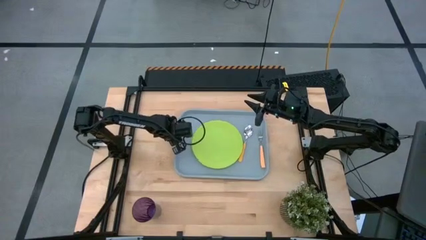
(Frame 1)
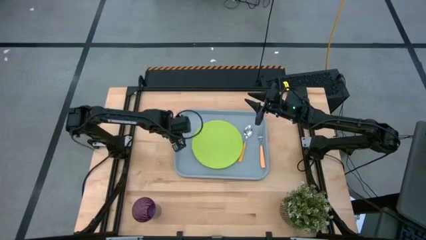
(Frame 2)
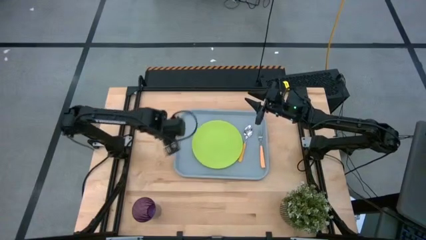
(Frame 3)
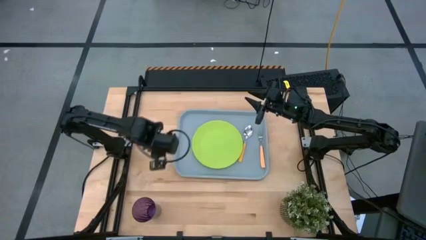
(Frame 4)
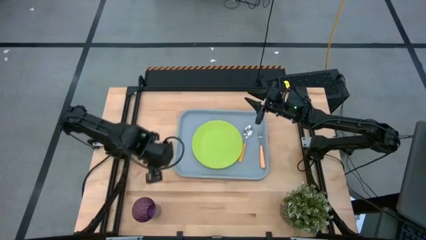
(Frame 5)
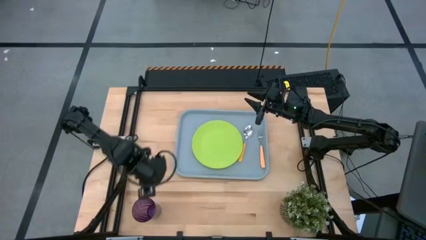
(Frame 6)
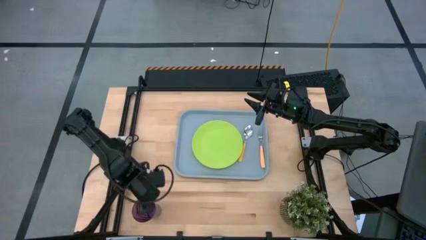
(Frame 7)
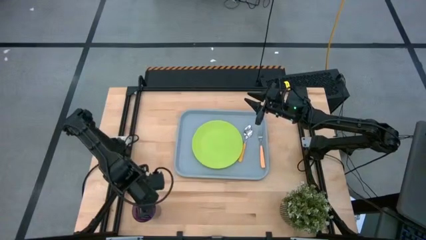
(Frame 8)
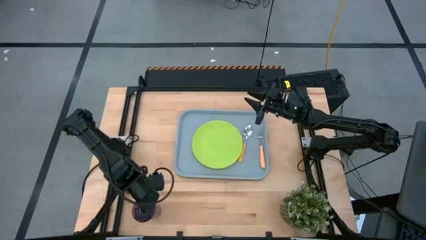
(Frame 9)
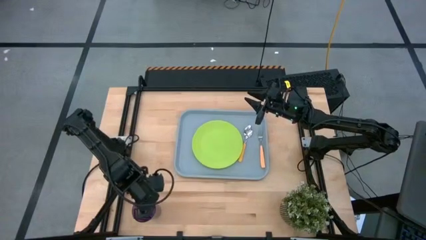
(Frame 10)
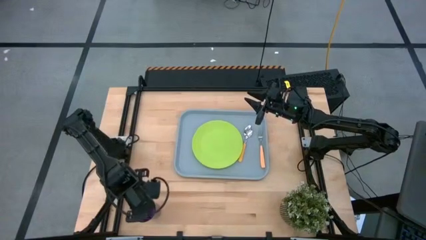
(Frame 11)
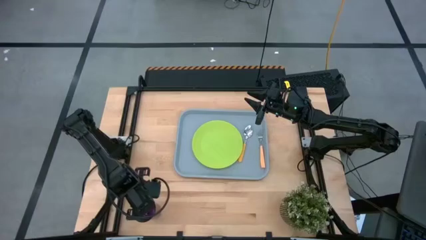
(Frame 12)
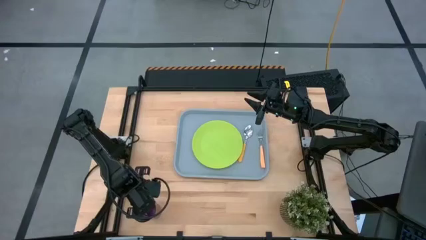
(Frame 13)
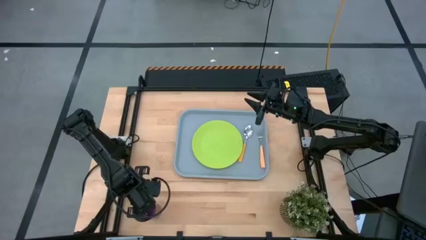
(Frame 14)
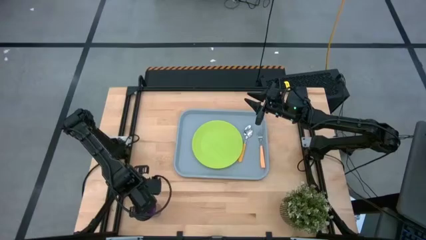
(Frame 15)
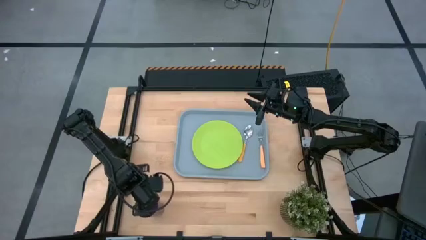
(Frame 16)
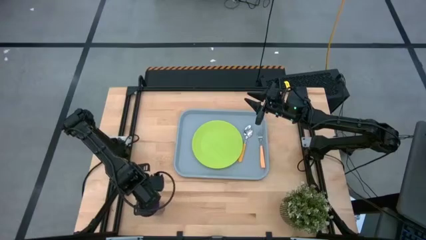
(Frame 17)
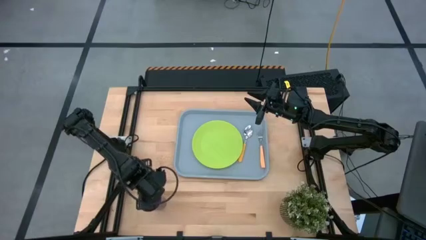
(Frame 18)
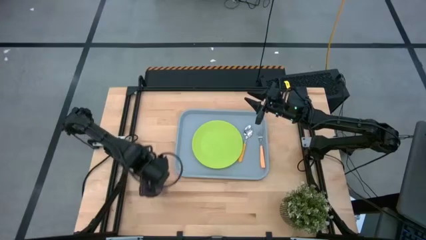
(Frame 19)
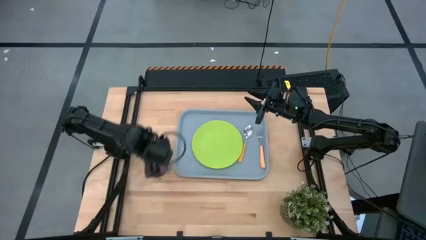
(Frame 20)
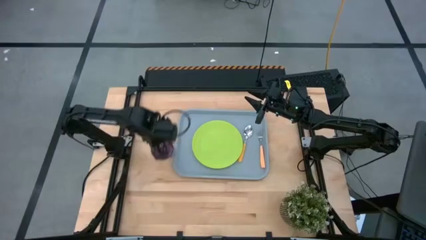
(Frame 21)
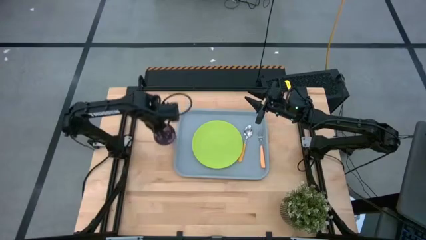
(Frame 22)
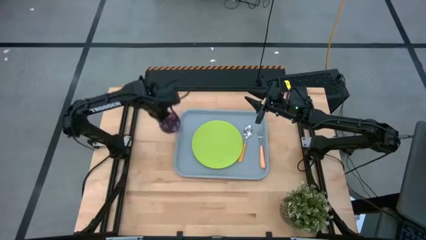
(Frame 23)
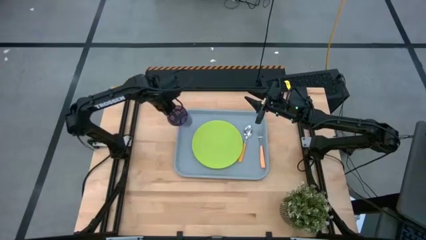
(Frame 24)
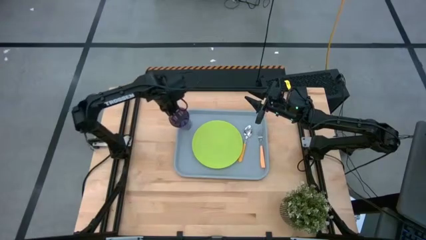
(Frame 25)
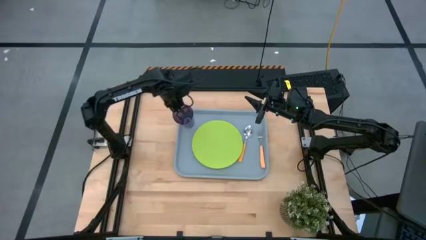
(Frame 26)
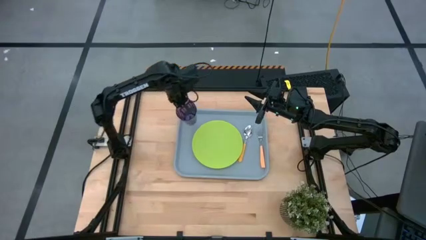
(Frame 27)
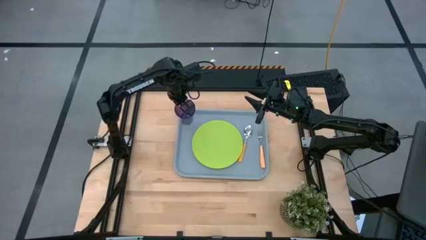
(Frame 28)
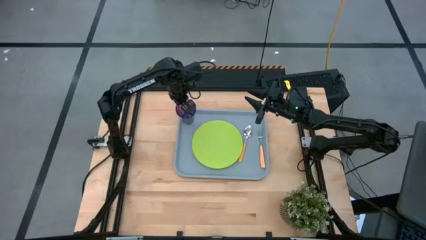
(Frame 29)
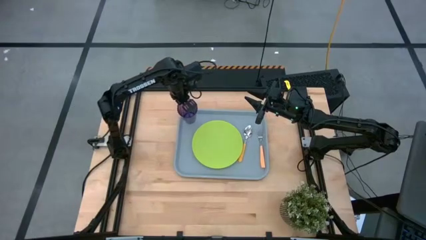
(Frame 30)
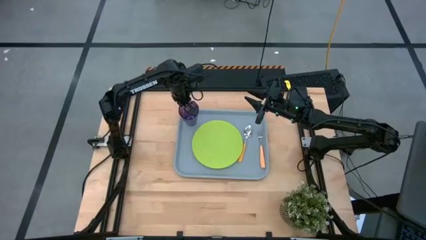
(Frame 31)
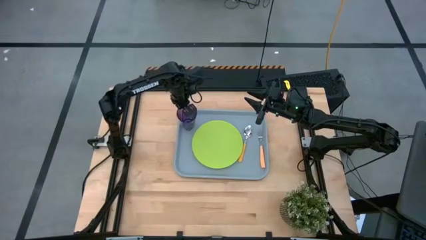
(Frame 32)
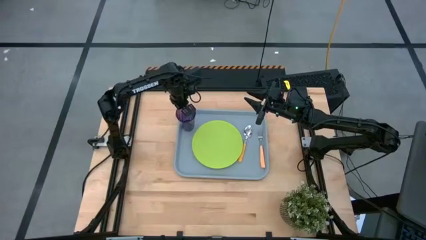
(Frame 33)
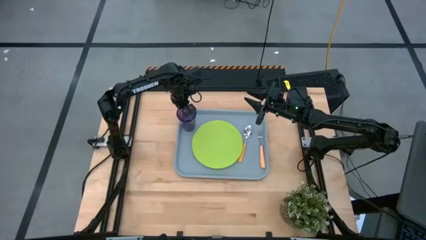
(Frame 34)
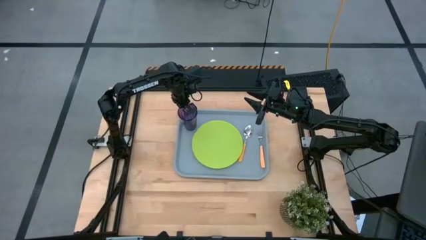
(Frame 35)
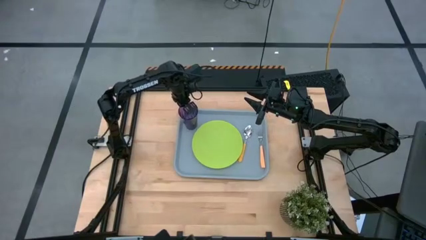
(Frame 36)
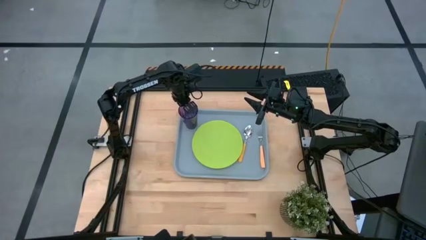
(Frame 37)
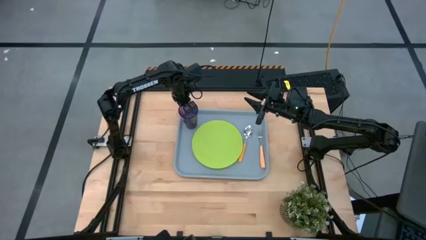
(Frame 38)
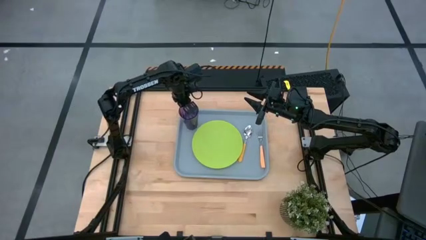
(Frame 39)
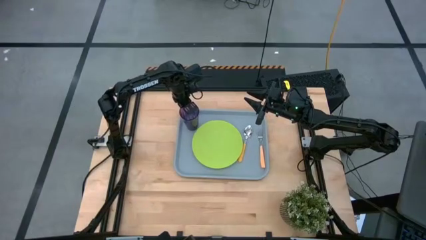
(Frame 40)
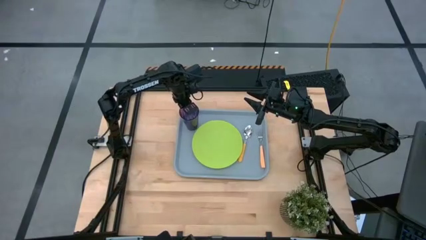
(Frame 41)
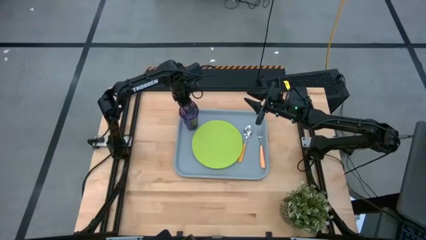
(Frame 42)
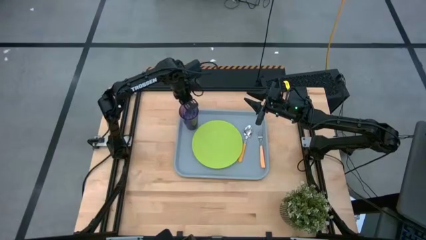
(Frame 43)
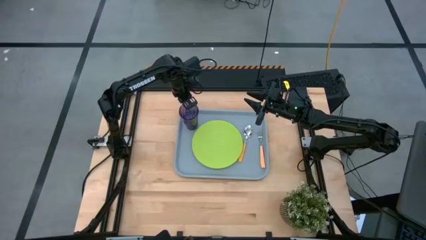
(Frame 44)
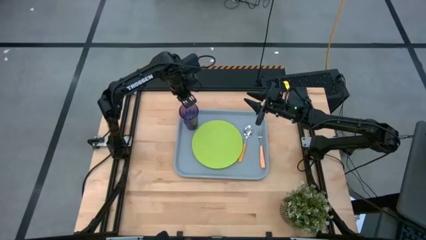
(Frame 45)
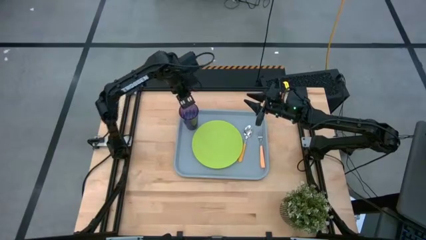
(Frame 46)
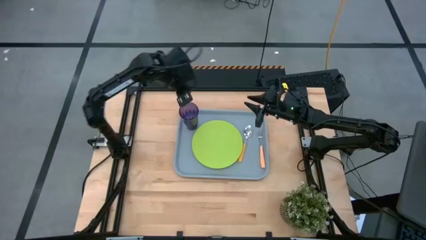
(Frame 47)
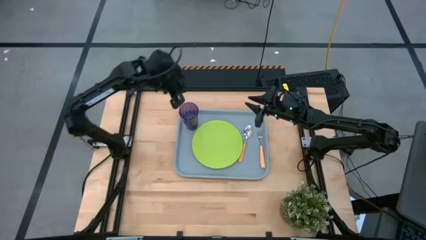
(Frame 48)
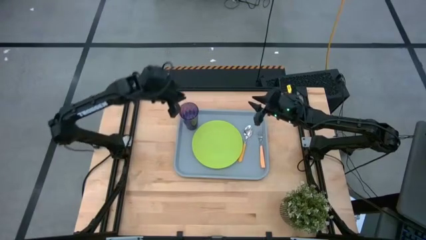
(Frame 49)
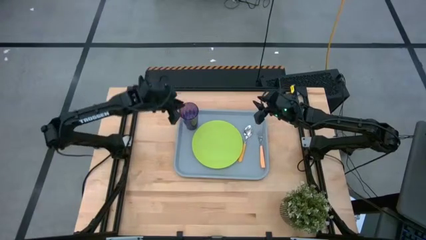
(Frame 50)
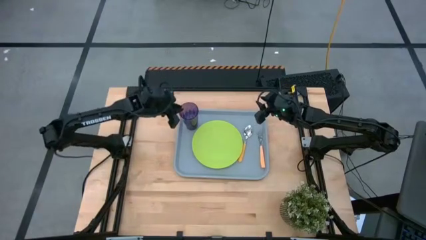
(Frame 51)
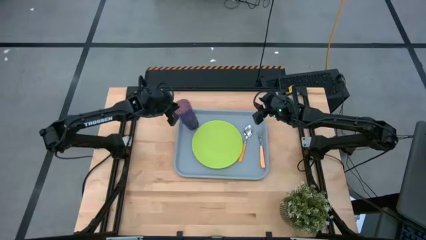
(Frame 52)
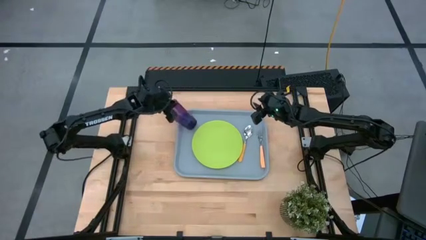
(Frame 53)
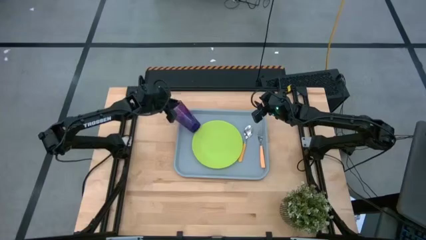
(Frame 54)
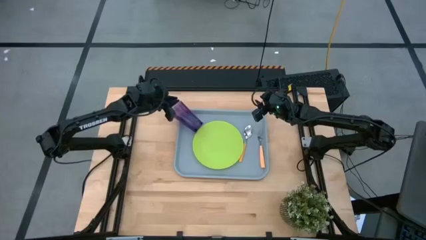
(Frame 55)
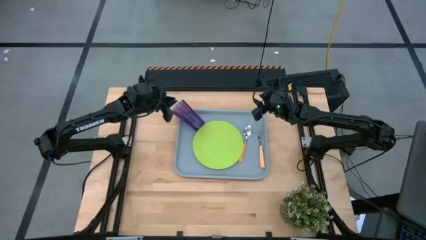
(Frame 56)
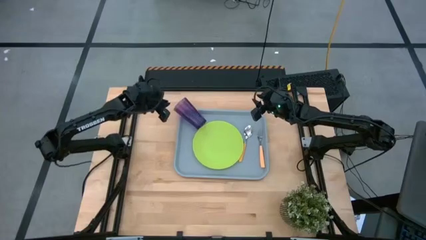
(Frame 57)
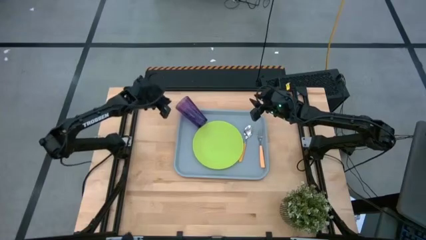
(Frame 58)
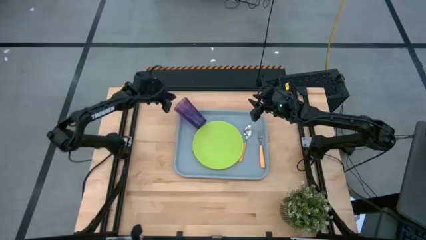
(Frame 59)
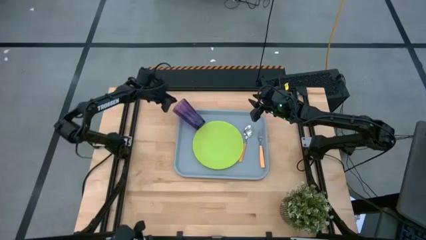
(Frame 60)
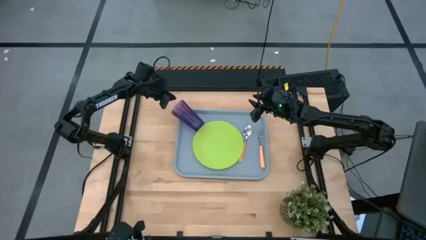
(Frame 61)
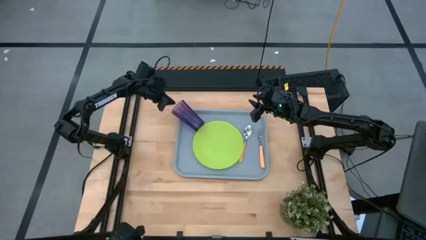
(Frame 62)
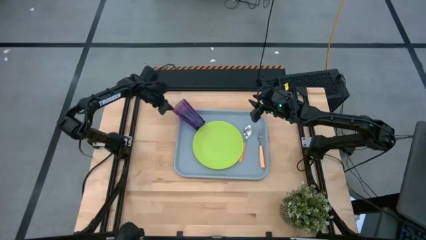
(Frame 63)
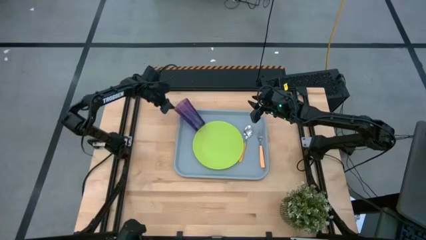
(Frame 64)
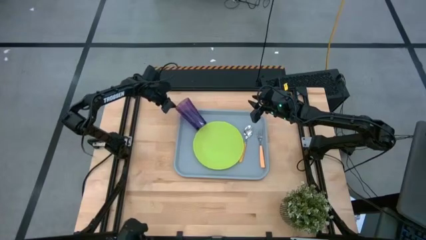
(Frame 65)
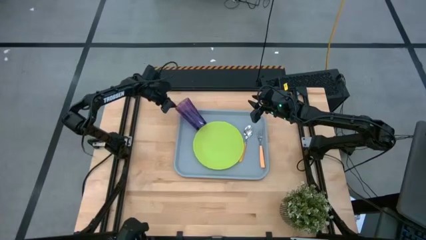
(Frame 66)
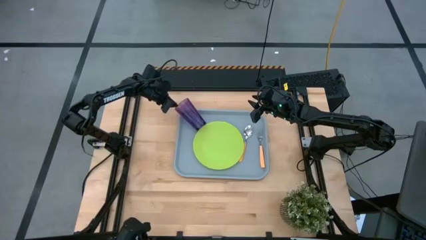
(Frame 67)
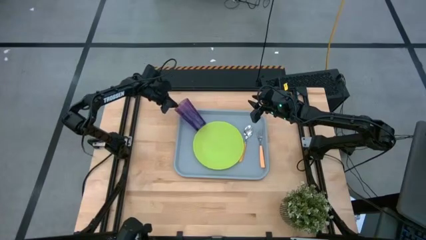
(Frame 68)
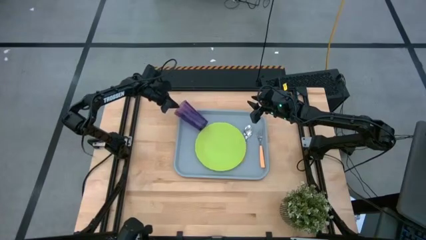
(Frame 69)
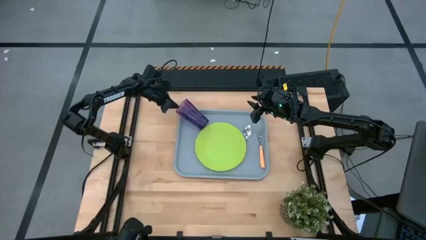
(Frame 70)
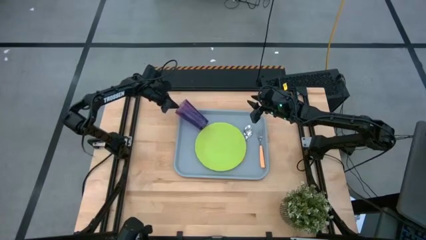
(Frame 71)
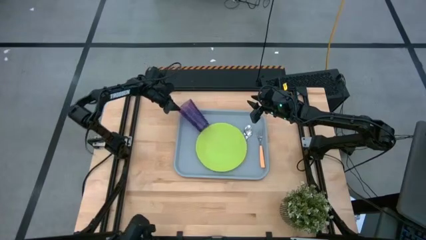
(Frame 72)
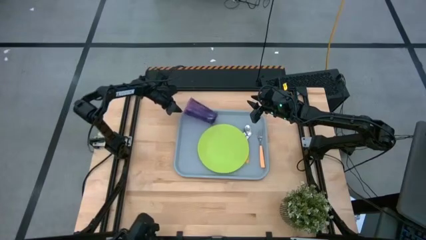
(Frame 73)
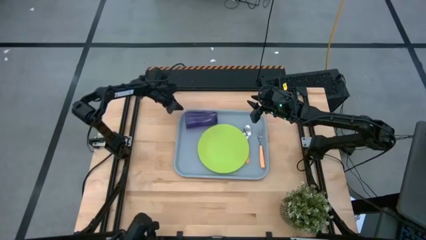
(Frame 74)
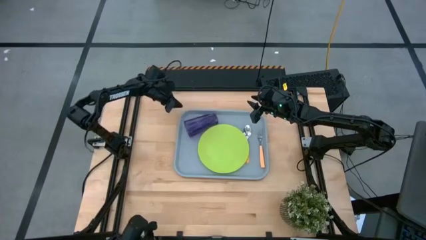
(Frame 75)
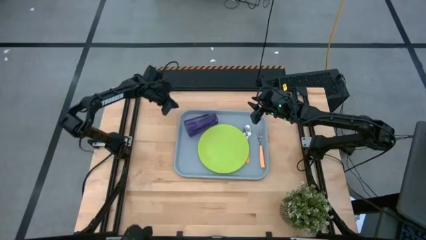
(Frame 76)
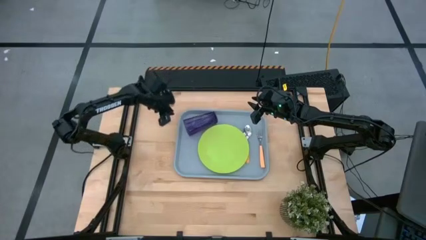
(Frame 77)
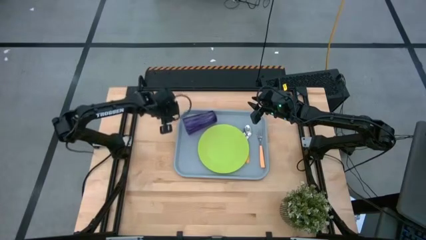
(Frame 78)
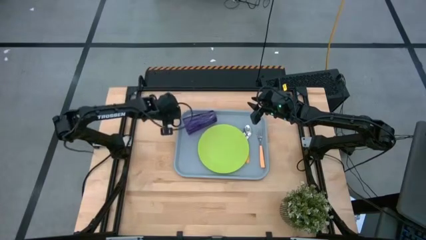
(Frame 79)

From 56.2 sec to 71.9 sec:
Task: Pick and place plate/cup/fork/spoon on tray
Put the violet cup on the gray serving tray to the top left of the green plate
